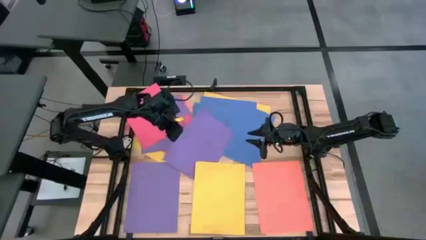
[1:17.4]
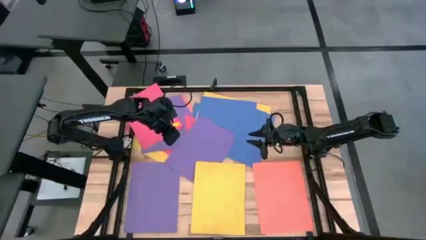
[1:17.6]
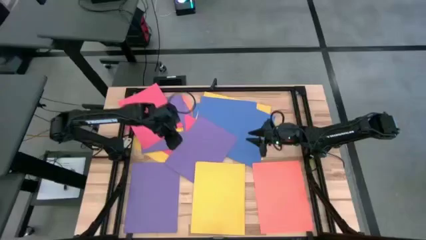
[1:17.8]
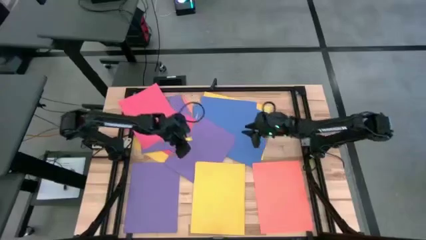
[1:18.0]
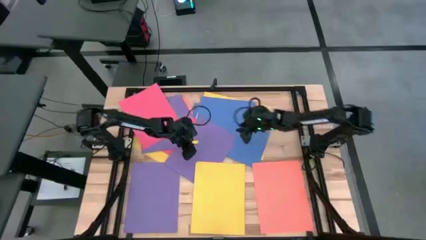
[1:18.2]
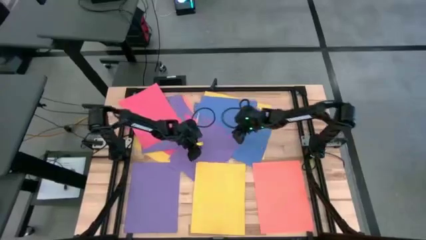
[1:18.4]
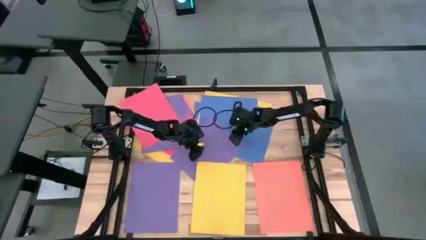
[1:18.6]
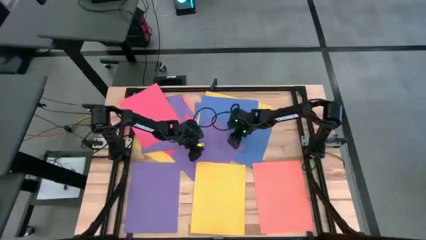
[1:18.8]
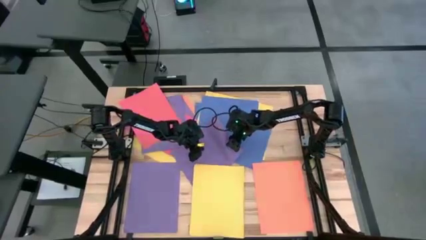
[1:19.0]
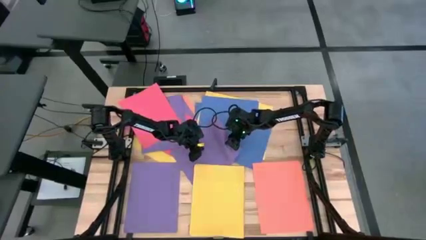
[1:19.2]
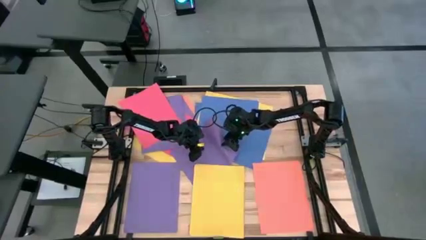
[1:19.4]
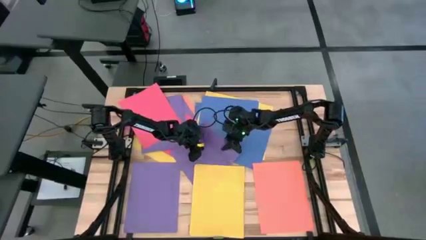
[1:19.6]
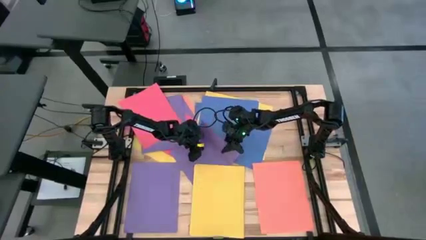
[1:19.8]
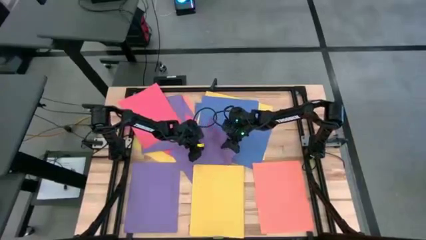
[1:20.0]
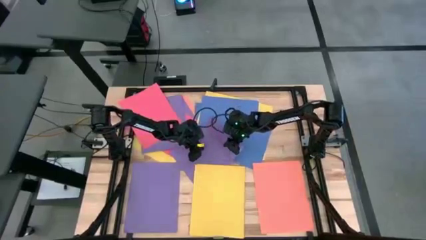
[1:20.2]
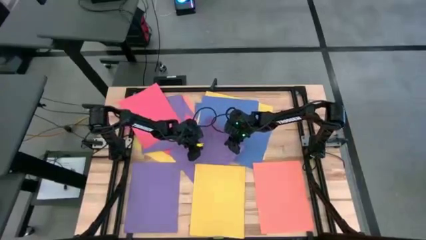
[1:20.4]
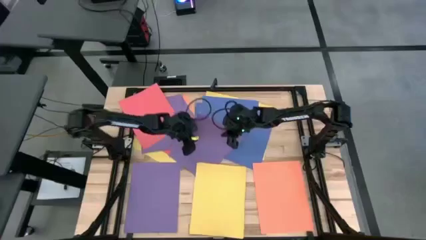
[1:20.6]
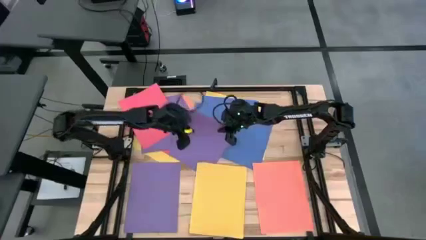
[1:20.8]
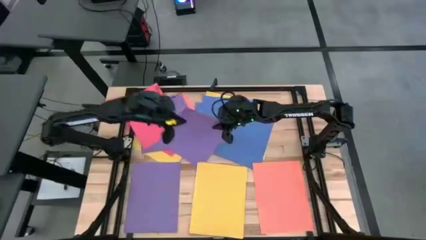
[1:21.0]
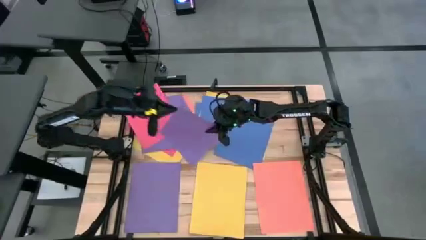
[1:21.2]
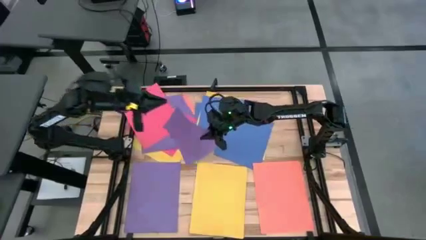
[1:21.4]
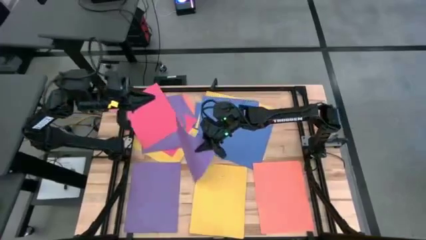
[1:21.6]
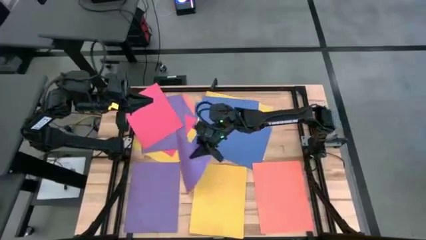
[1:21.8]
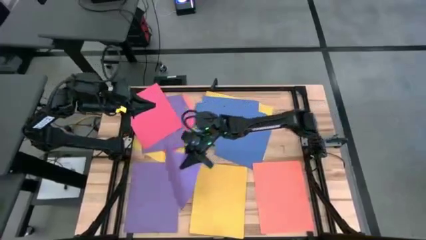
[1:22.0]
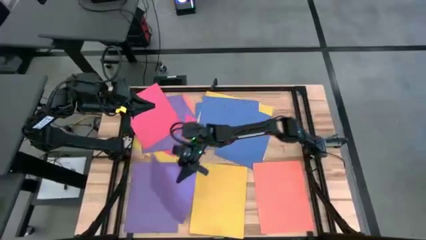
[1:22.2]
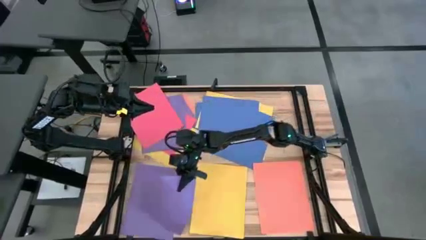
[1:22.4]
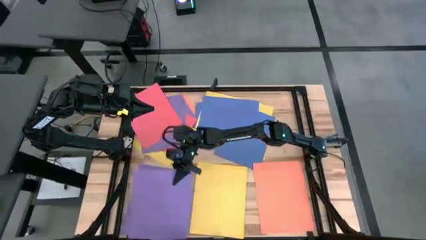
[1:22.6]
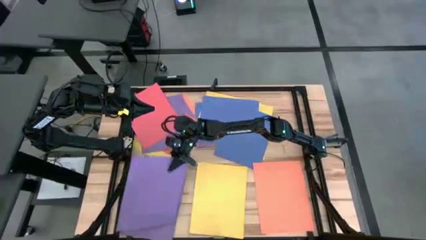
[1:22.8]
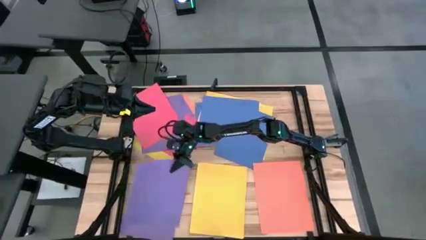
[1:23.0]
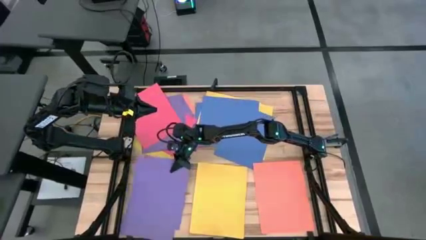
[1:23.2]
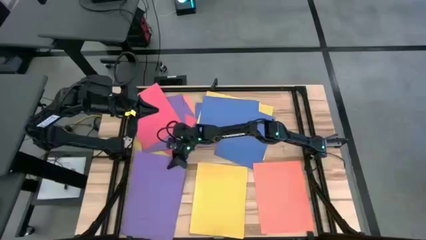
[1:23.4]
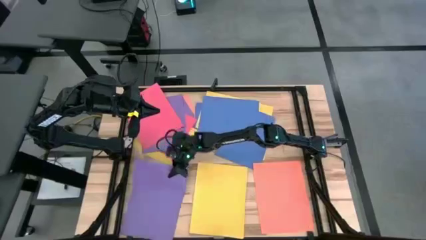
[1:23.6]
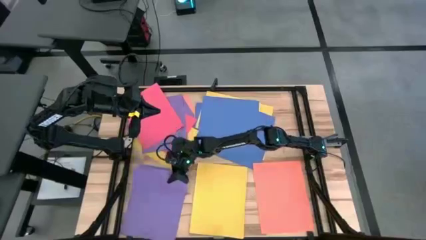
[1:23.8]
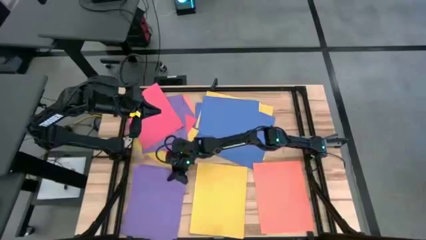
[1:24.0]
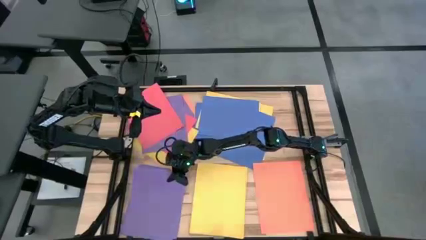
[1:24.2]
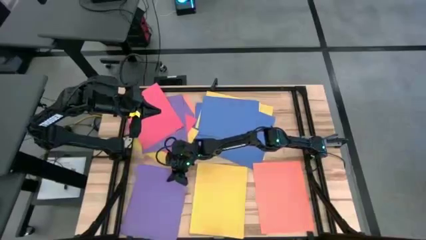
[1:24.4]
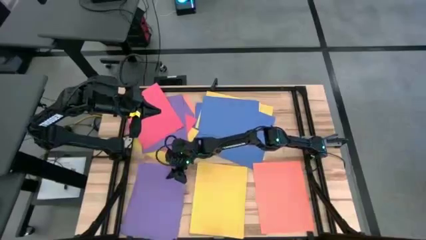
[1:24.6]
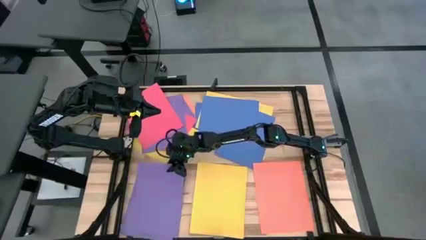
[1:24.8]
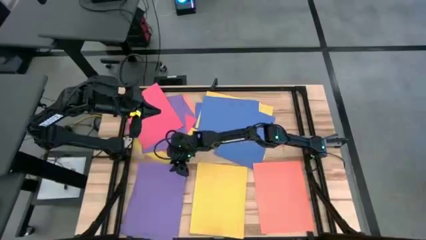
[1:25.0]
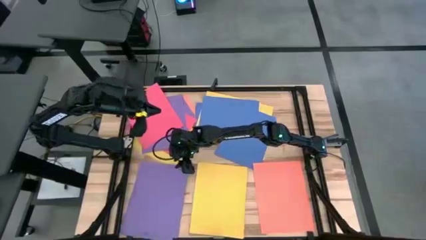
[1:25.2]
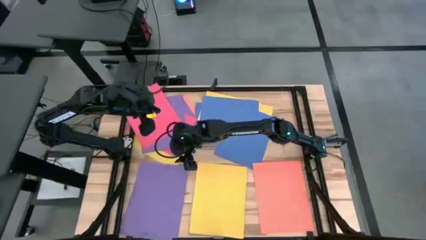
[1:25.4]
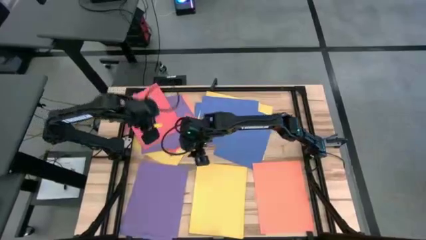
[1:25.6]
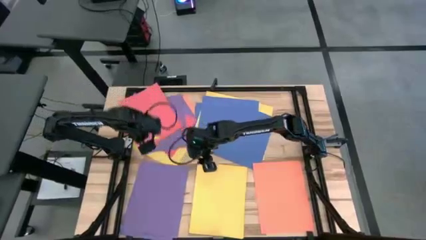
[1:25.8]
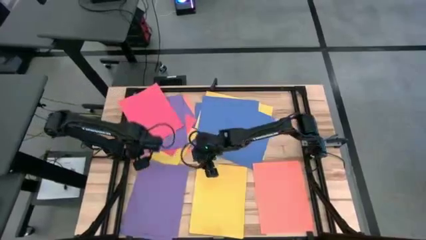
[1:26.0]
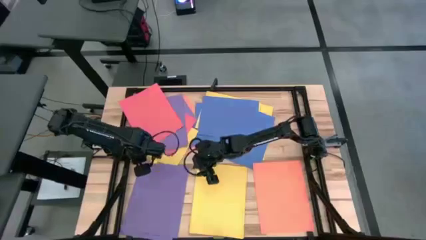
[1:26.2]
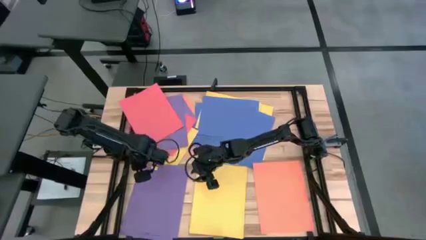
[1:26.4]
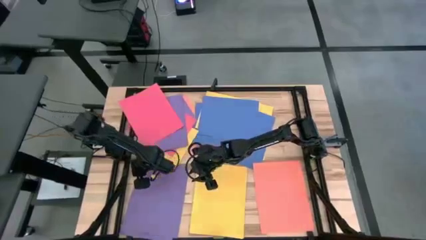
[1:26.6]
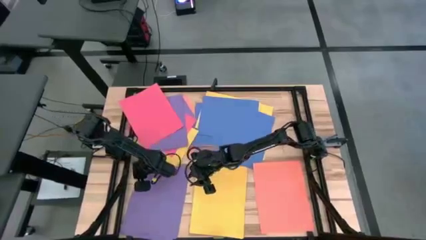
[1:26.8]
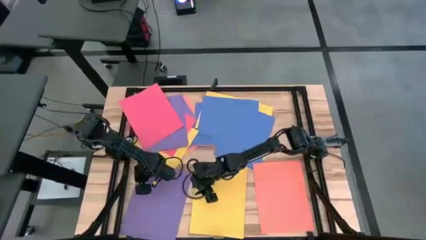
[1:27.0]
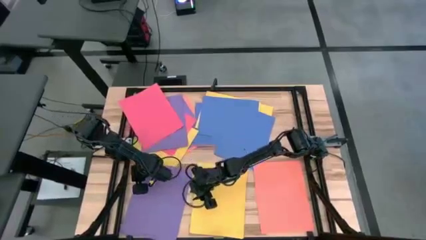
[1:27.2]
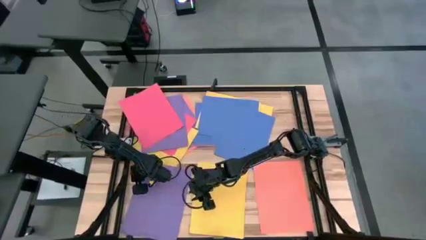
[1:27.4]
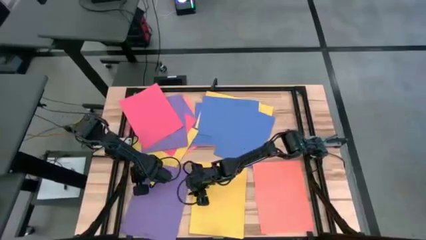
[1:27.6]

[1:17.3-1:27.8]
Task: Organize paper
Stack the violet paper on top of the violet paper

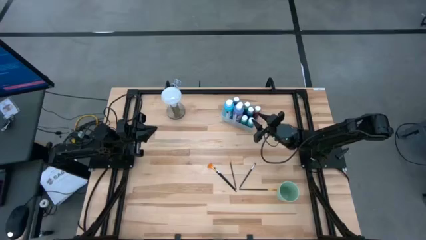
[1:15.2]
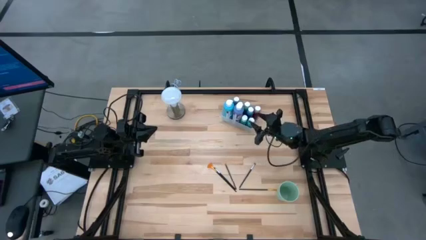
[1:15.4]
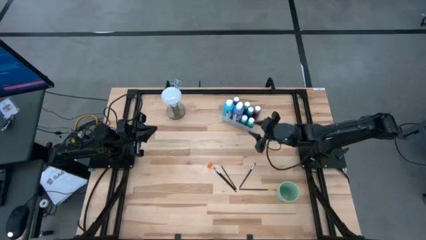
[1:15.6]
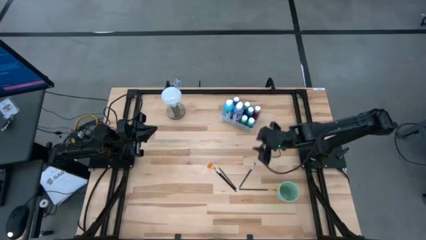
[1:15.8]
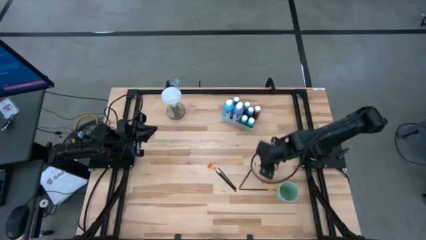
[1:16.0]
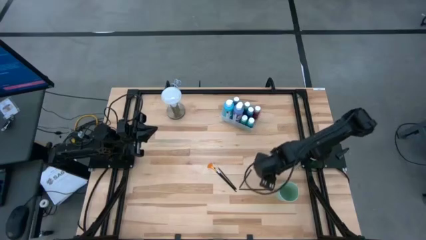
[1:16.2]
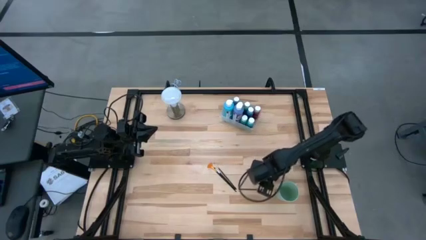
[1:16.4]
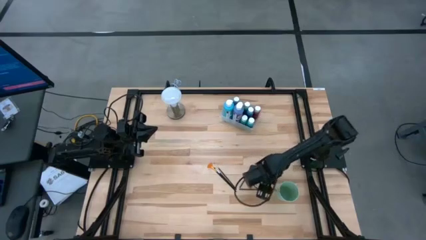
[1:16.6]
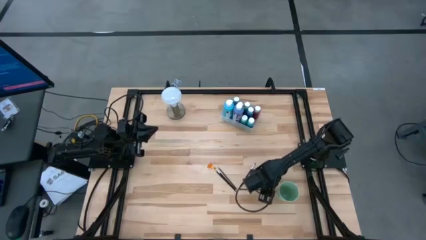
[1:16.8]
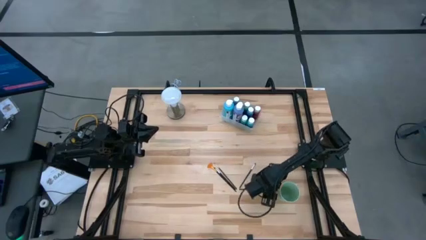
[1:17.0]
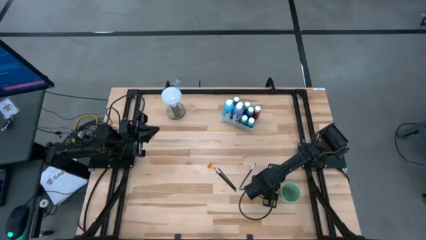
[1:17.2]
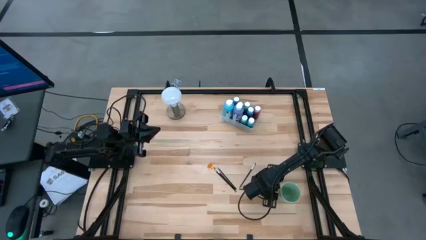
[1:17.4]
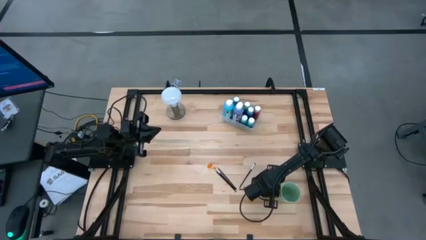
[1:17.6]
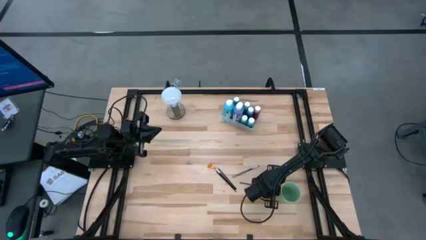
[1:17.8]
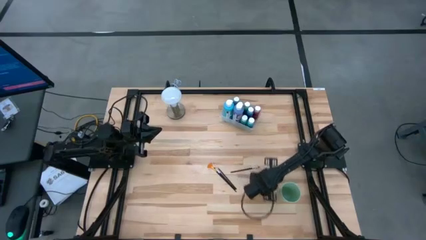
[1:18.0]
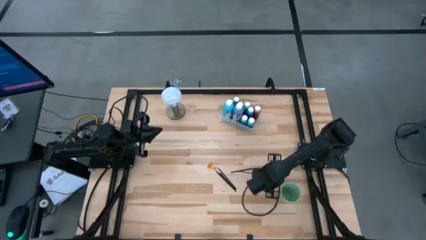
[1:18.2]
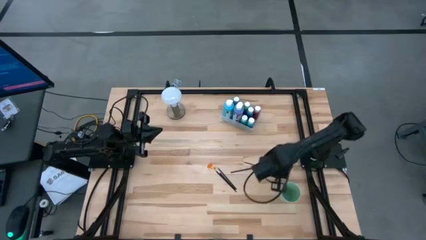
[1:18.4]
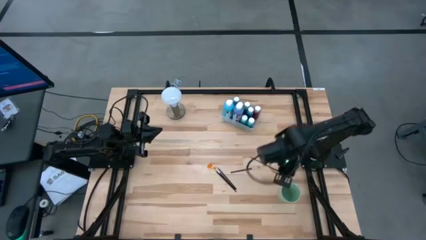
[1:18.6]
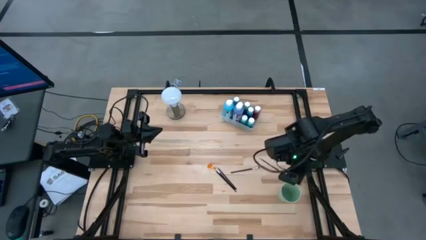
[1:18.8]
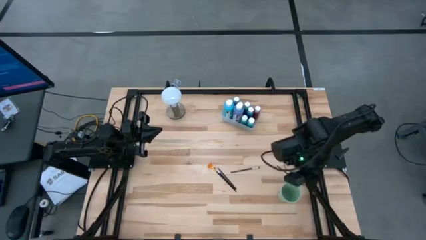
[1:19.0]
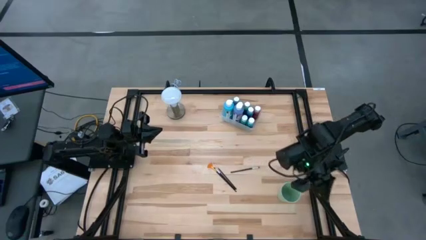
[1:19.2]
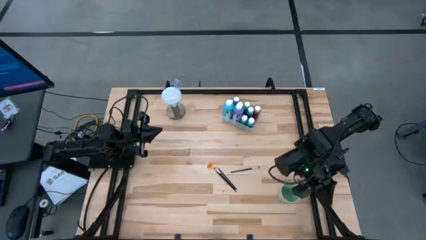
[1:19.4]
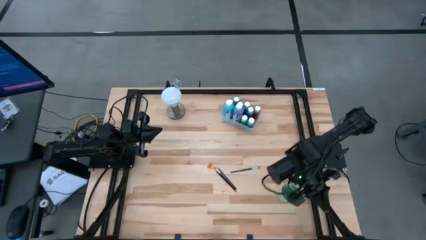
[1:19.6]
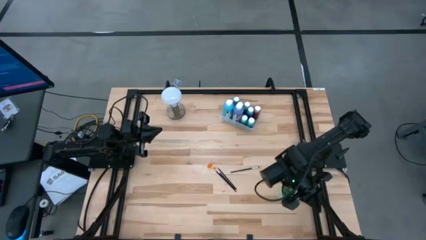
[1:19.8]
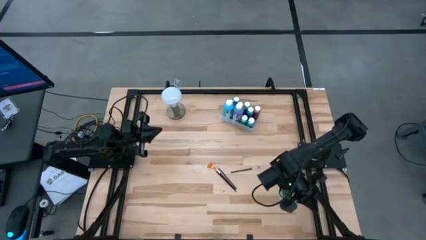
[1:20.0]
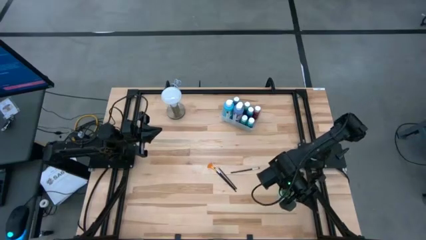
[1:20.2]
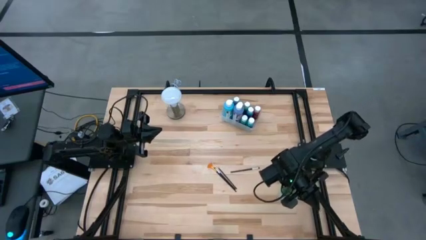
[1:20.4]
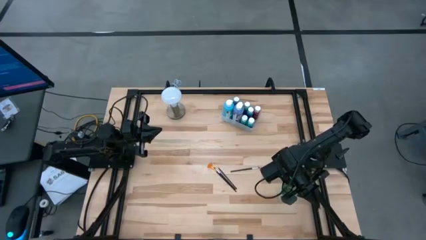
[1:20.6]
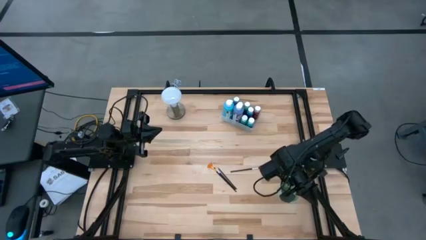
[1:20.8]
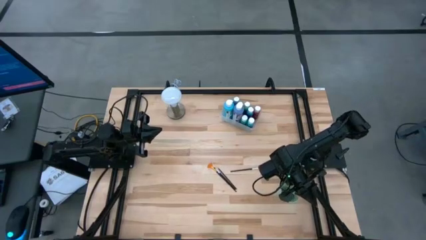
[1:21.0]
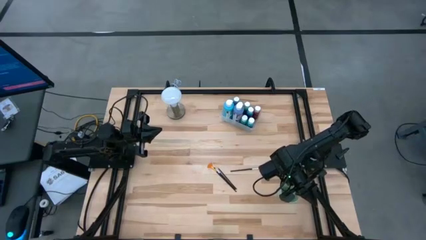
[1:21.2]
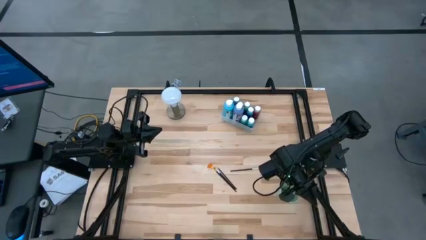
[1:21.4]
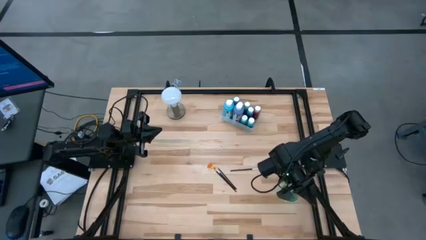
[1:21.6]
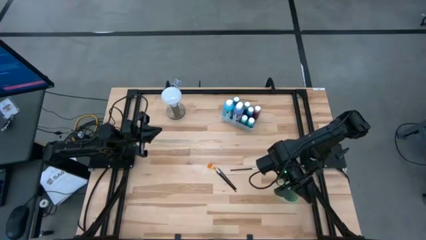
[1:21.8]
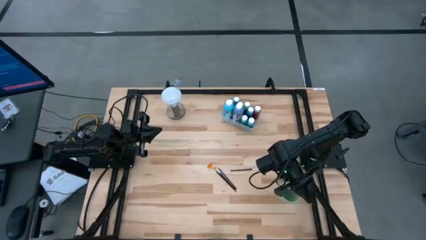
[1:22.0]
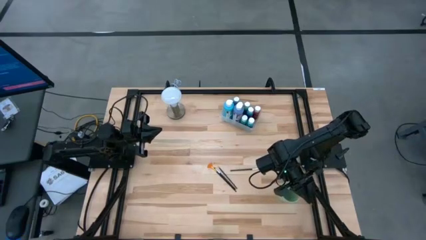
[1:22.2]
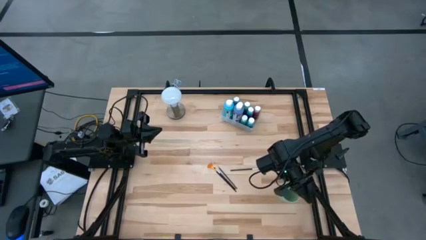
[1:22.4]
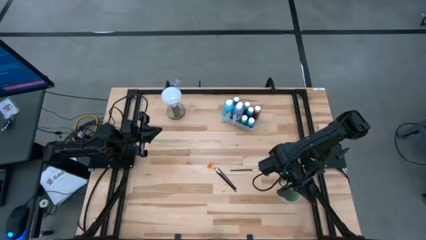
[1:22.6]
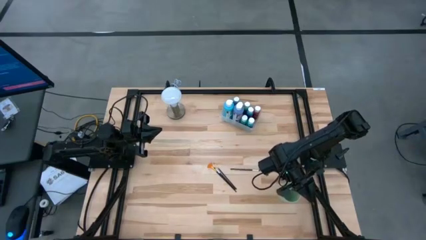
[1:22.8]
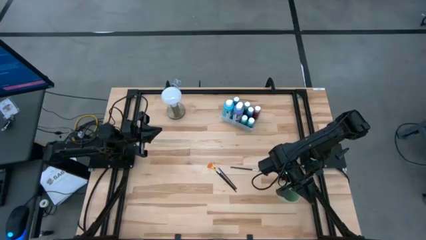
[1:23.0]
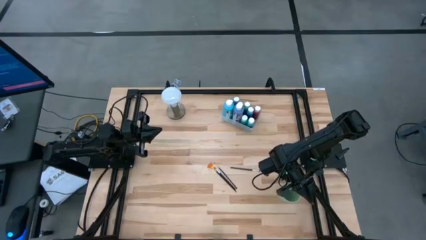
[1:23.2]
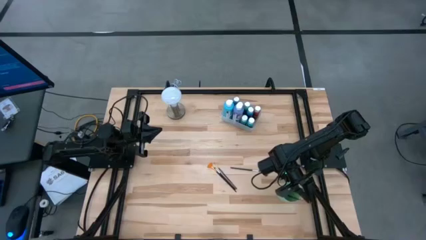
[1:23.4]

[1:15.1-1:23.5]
Task: Pick & Place Paint Supplies
Put the right black paint brush into the green cup
